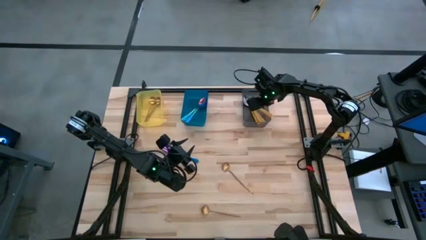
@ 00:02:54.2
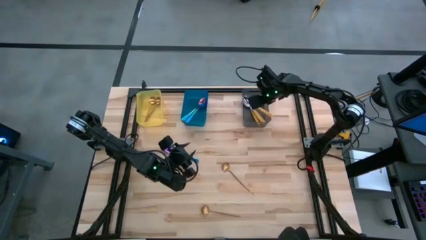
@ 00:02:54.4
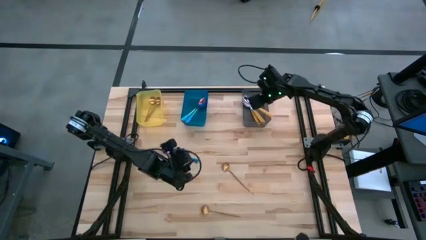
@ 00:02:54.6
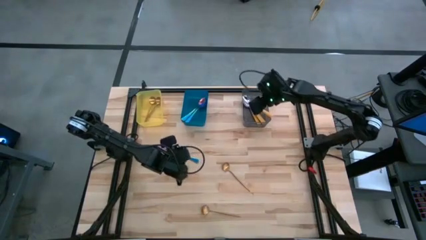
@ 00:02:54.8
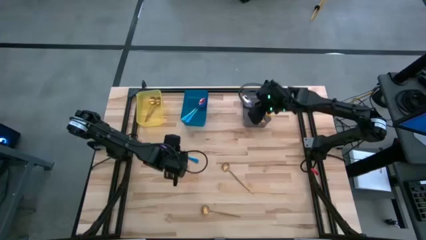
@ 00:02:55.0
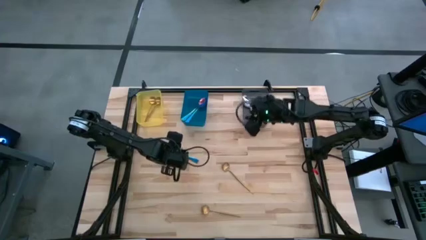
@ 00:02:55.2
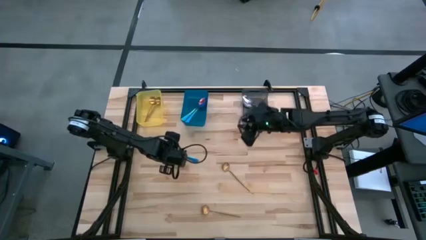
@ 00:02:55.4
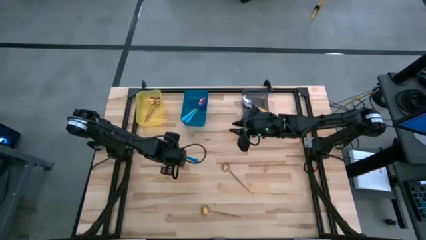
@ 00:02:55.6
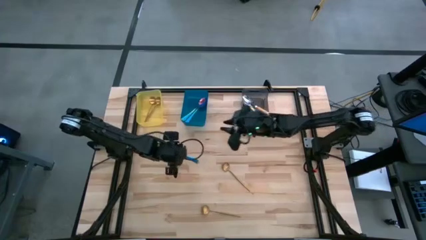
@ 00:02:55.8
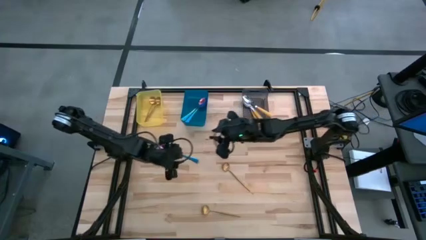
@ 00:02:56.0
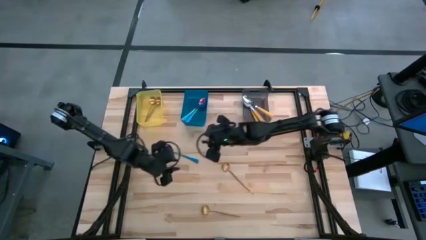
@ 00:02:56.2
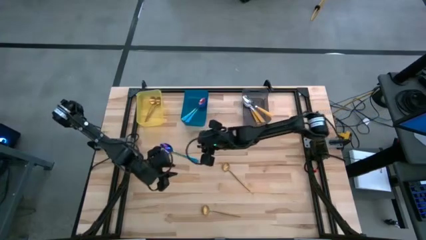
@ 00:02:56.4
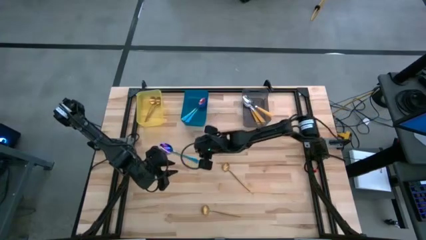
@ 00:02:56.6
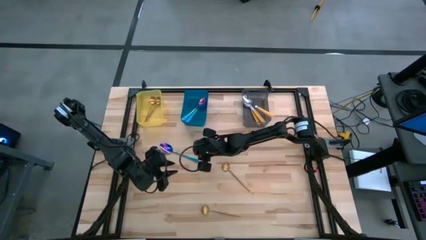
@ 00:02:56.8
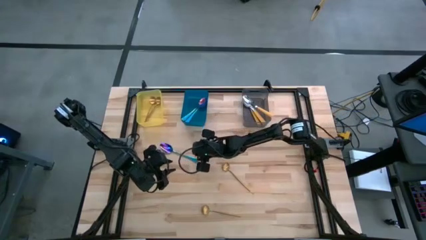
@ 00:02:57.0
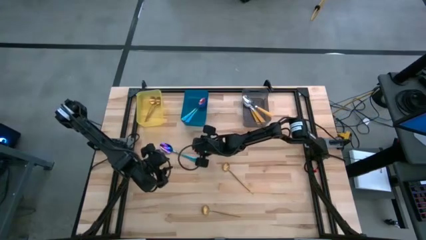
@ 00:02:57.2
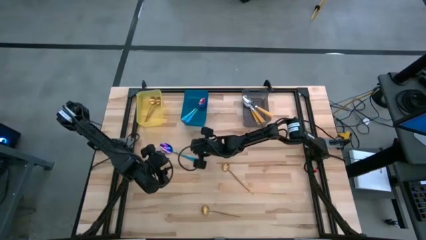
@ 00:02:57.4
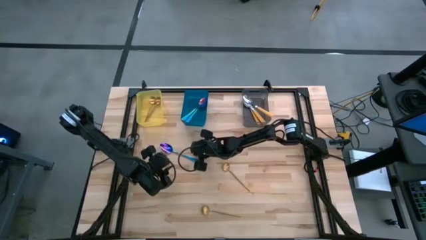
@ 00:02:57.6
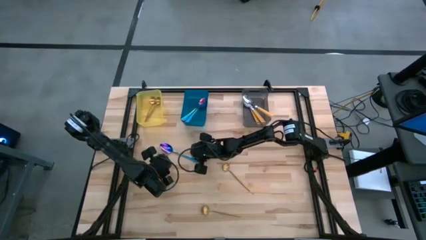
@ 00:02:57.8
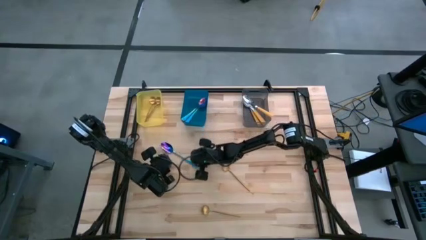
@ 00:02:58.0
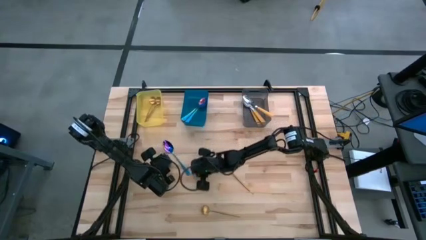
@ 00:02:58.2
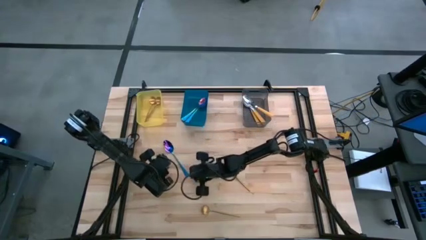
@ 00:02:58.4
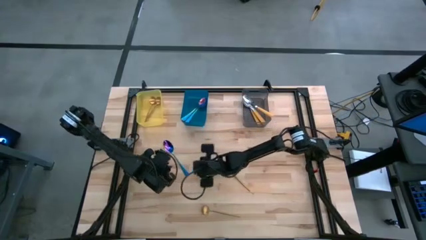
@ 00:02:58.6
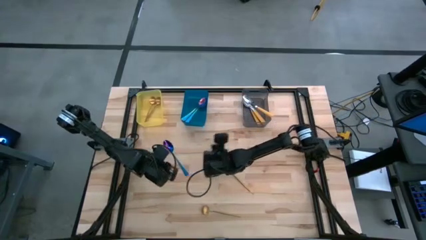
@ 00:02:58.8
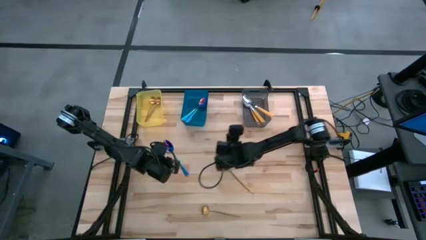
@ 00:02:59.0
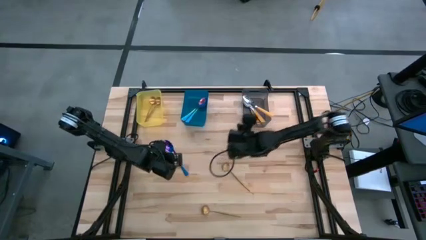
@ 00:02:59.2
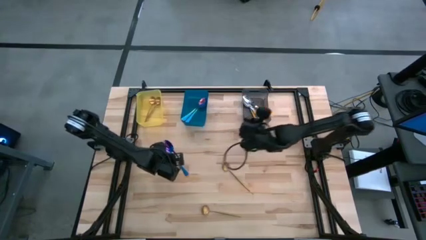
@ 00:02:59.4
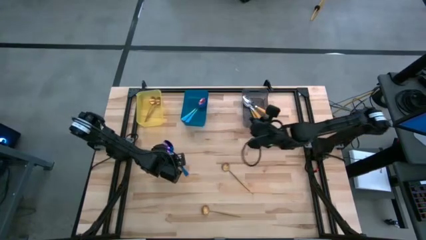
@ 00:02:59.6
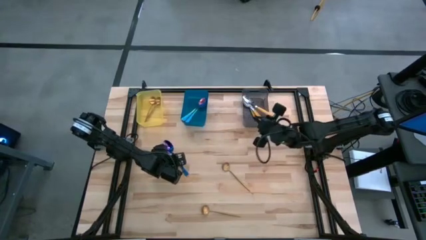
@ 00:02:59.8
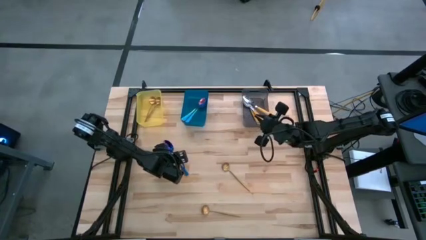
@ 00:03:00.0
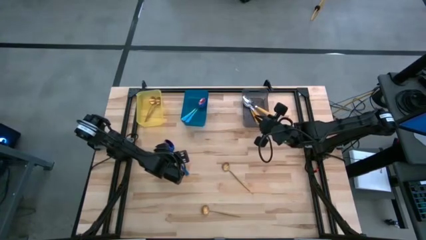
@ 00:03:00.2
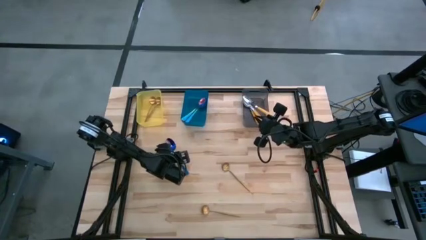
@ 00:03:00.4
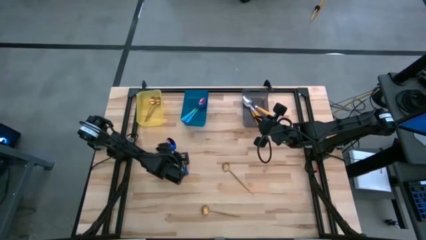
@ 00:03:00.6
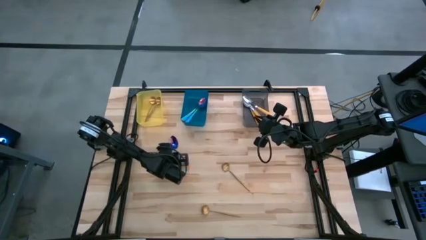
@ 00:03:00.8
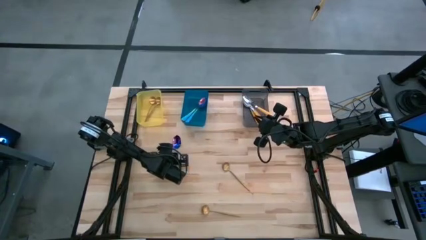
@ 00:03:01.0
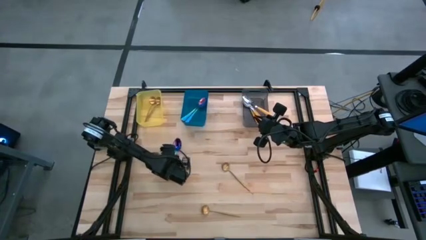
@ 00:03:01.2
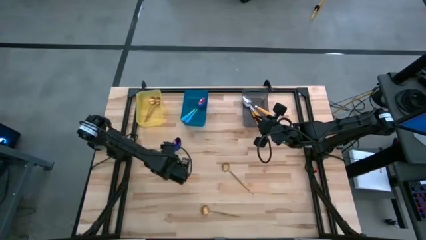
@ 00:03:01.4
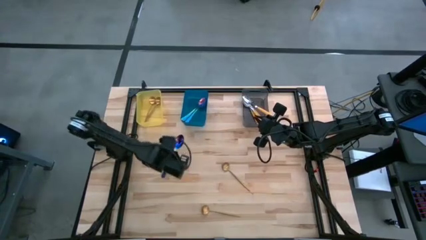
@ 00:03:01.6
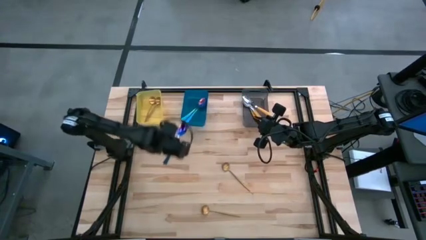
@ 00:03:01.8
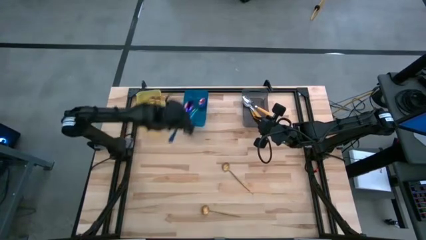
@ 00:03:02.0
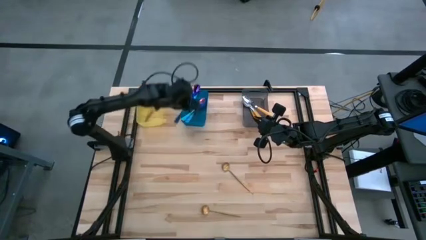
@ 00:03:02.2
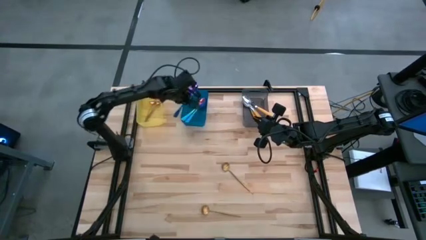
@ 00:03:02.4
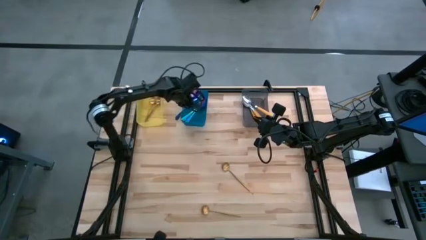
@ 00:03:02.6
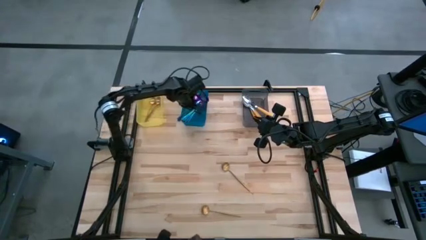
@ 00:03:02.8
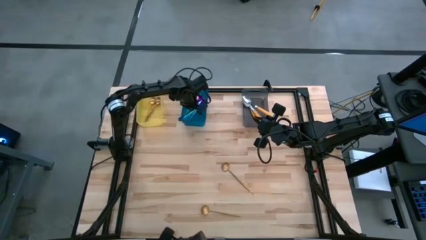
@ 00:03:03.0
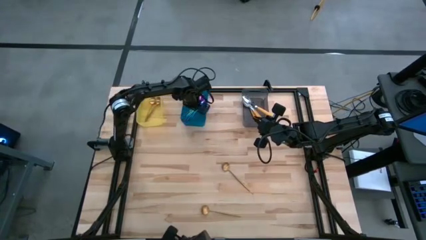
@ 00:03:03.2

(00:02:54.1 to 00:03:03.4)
Task: Sort silverware by color (type)
Put the blue spoon into the blue bin

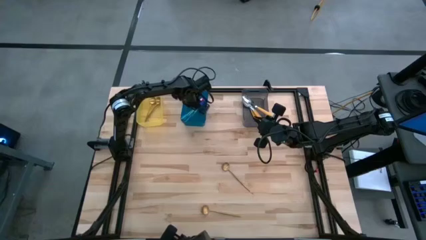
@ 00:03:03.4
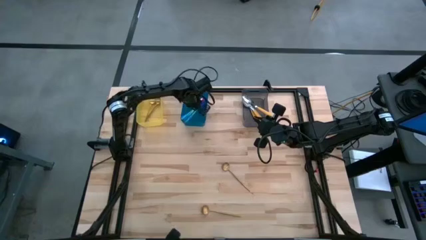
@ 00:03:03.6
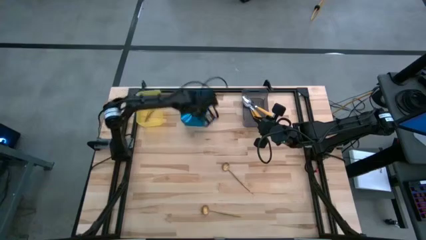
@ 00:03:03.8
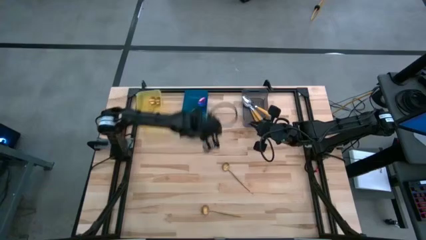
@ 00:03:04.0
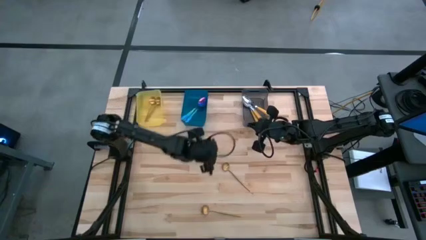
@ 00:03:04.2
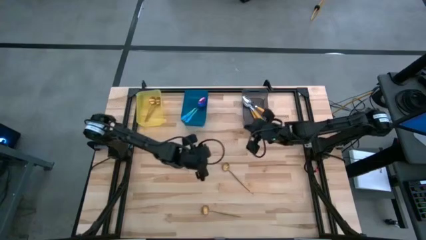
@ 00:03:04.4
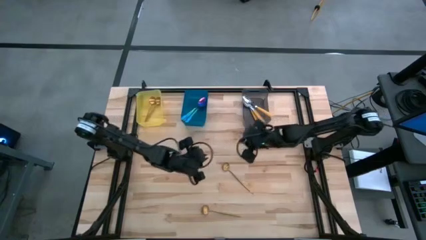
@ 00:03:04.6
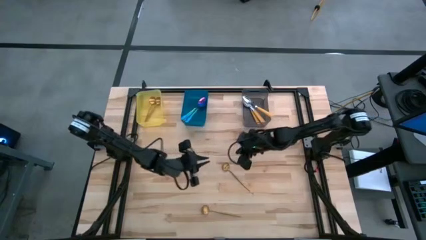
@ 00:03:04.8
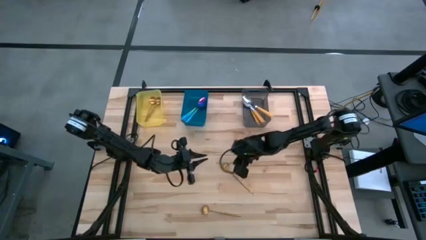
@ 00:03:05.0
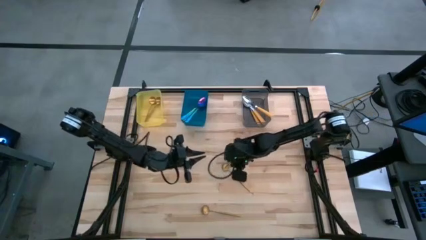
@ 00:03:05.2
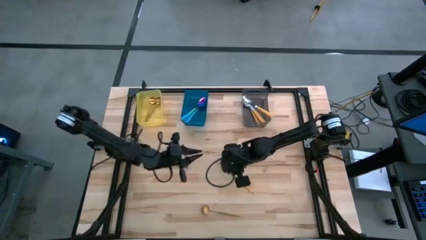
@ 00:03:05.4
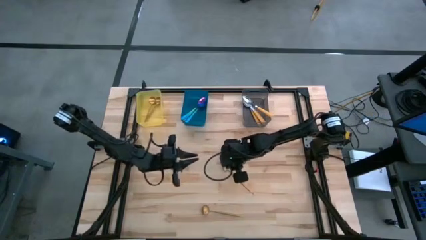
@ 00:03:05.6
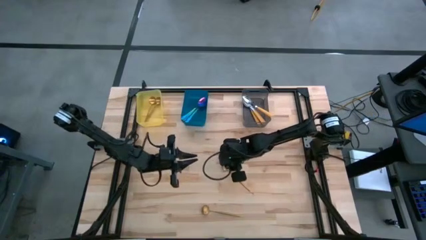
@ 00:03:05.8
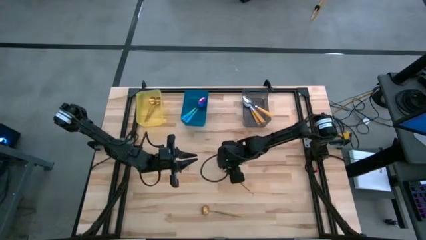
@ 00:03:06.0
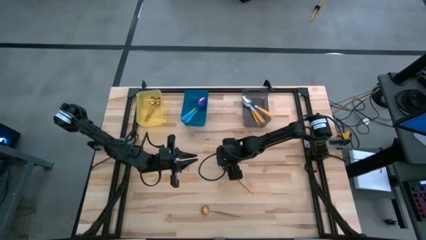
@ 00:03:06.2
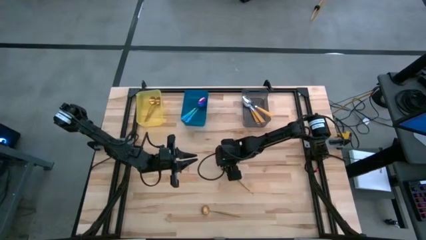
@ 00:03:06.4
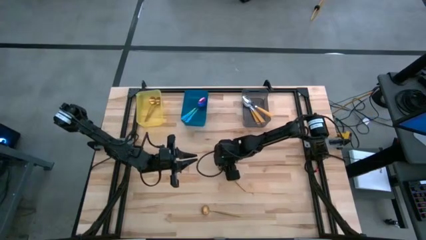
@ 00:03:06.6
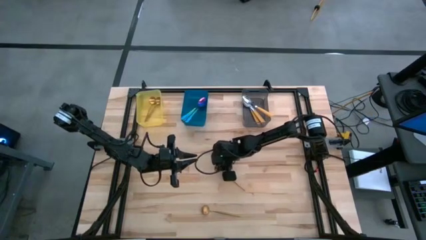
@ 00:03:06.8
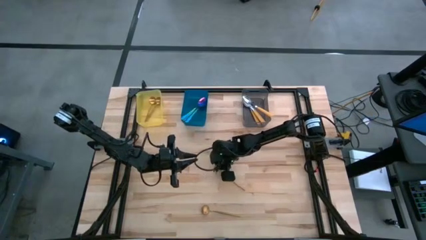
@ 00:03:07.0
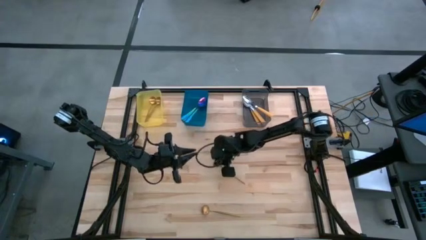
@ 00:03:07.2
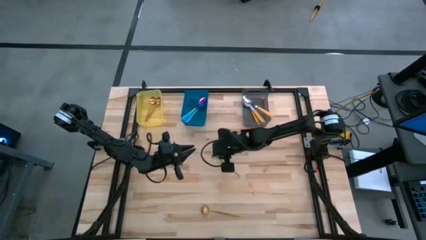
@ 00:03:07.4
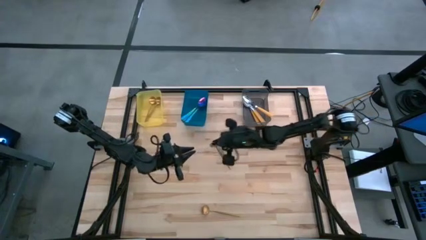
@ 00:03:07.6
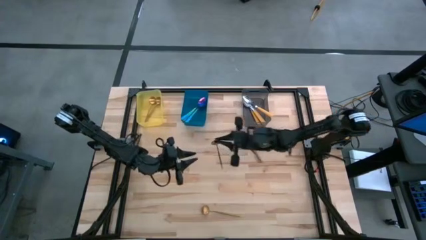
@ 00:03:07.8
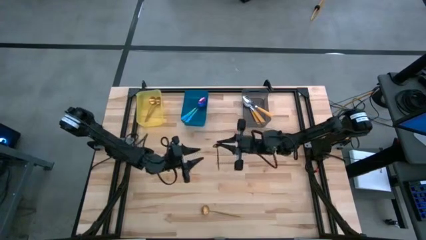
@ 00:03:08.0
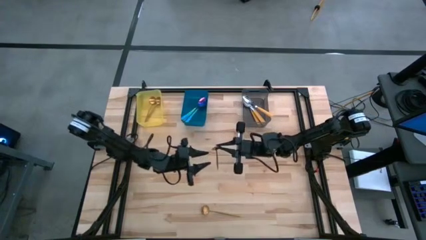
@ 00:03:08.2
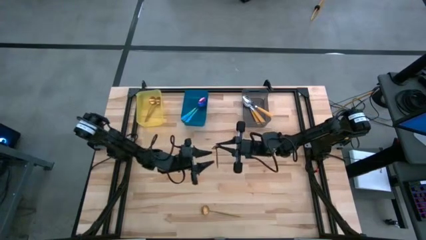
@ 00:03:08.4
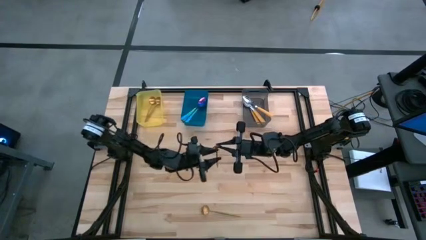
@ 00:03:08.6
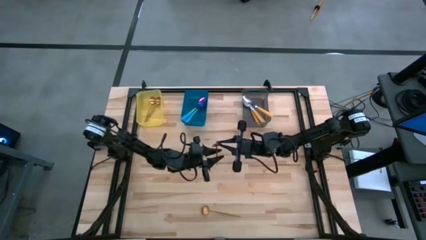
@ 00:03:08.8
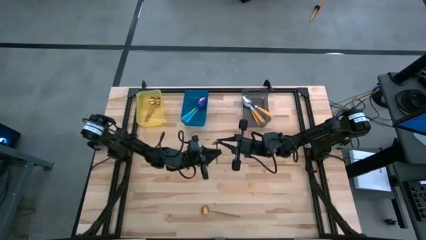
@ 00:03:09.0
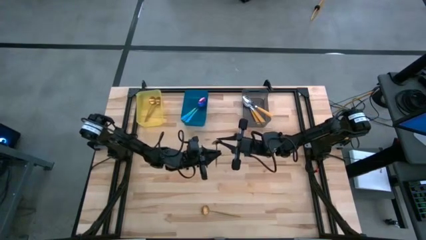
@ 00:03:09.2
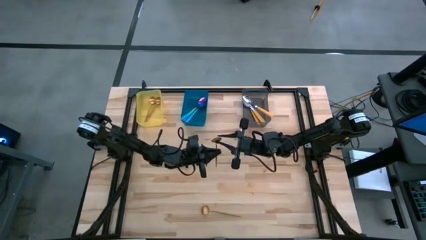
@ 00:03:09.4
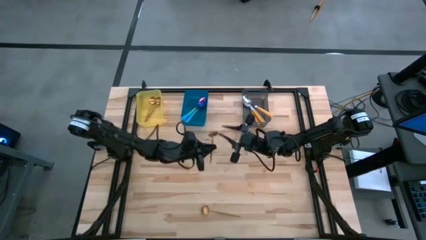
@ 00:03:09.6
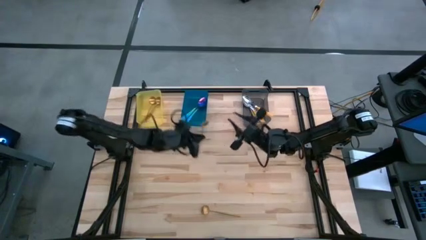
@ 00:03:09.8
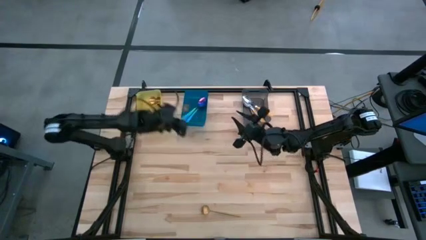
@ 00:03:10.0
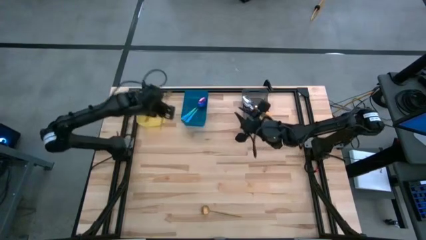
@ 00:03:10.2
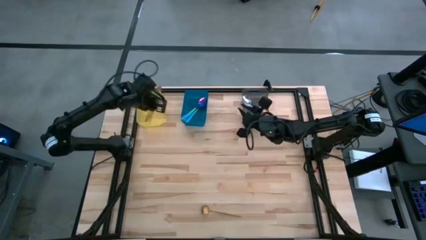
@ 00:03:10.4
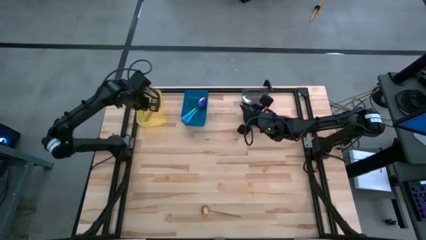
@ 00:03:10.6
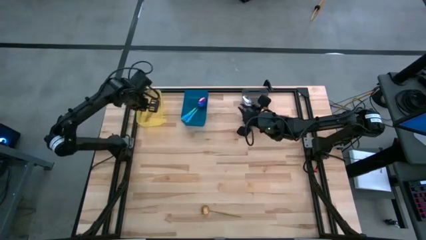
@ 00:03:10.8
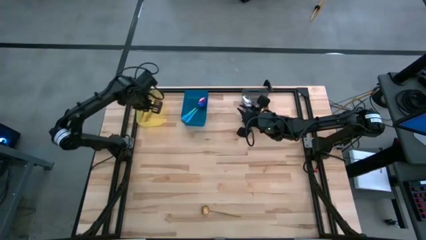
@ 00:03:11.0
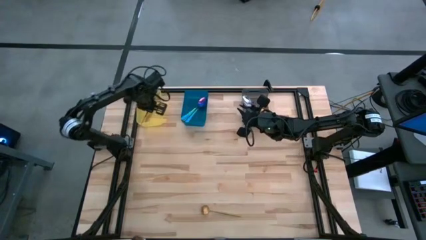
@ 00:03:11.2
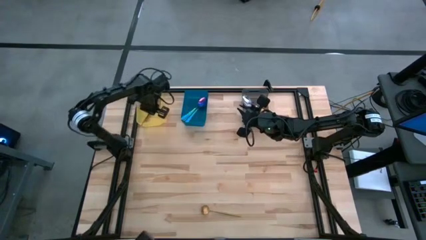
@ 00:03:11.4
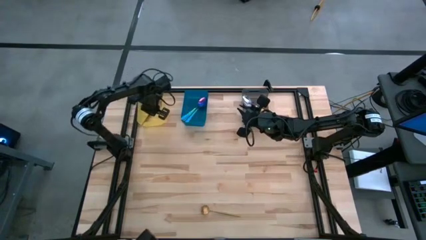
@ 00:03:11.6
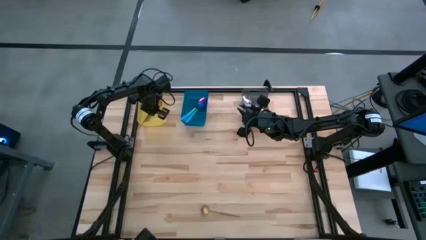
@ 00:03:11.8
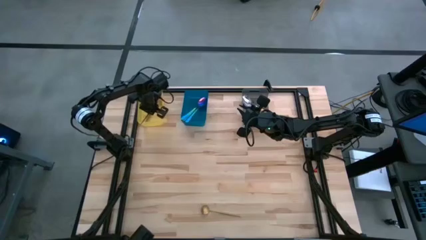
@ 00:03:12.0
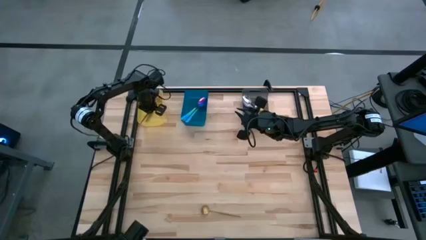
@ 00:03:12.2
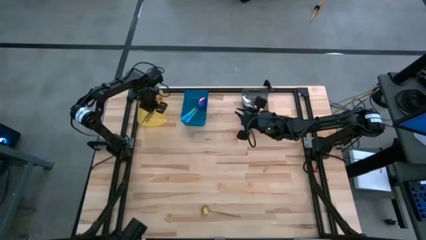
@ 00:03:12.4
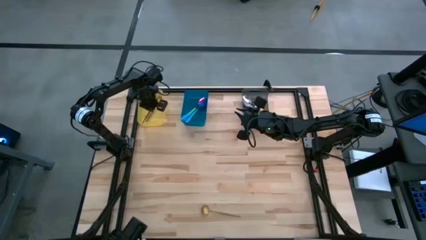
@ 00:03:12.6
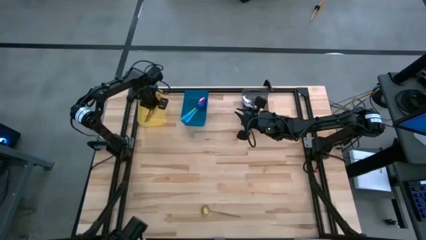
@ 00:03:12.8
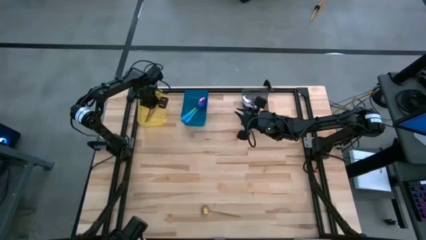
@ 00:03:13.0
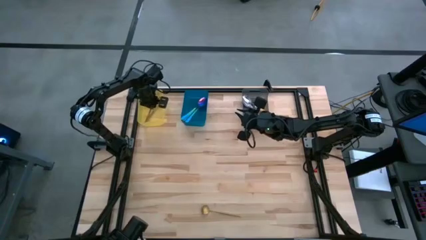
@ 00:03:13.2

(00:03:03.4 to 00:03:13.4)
Put the gold spoon into the yellow bin
